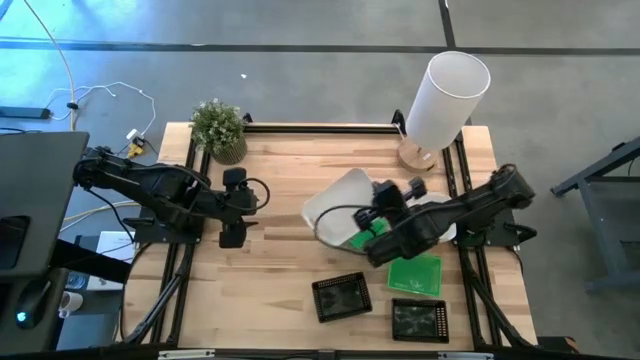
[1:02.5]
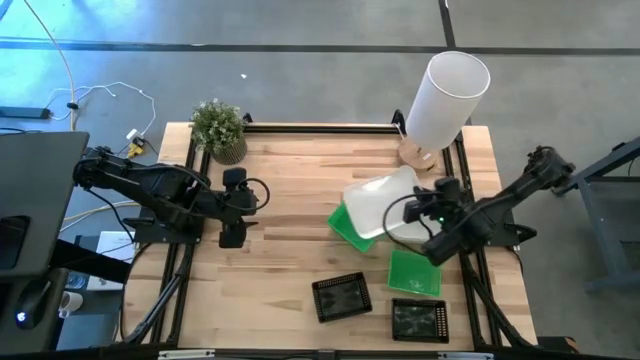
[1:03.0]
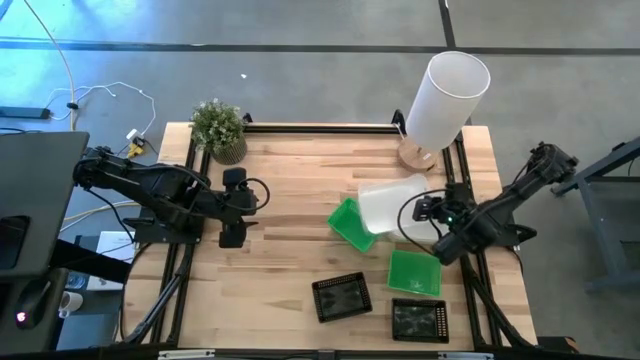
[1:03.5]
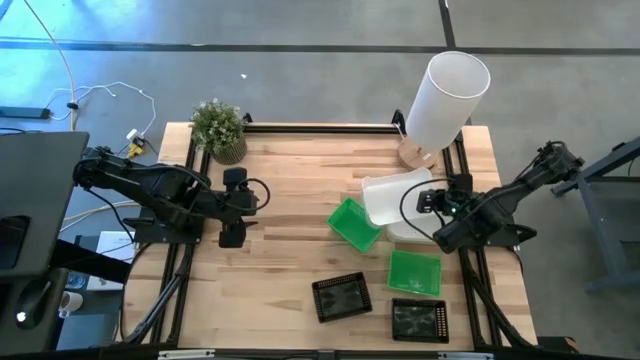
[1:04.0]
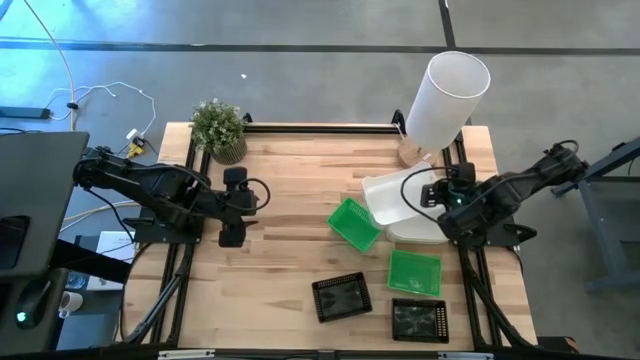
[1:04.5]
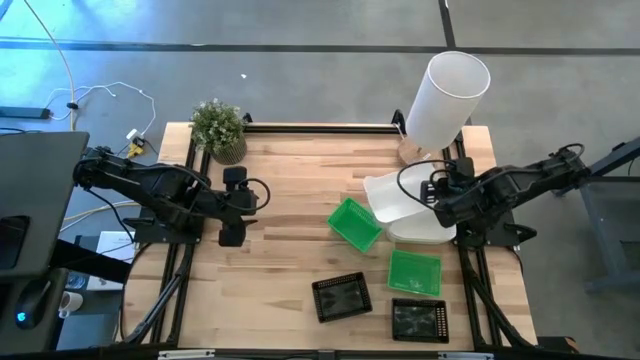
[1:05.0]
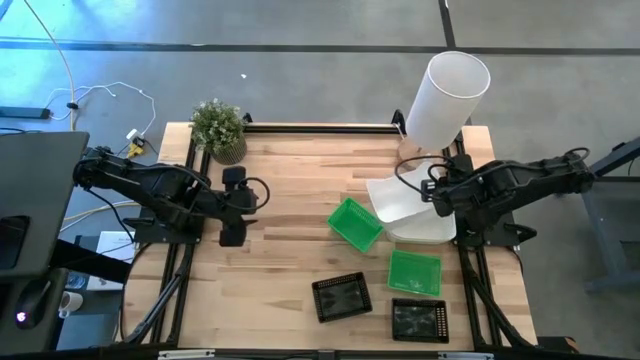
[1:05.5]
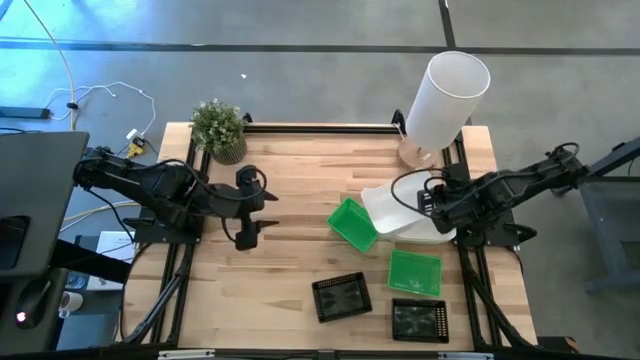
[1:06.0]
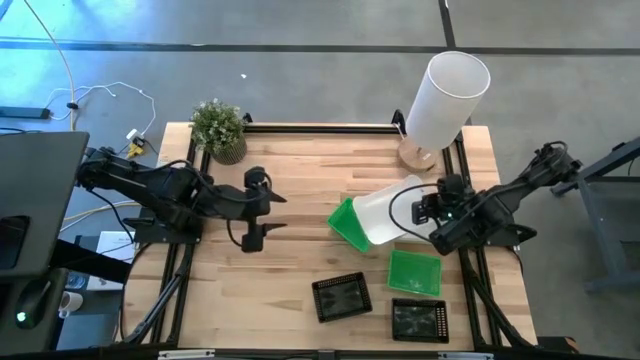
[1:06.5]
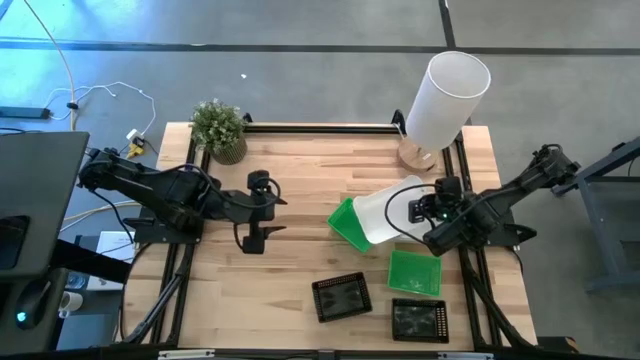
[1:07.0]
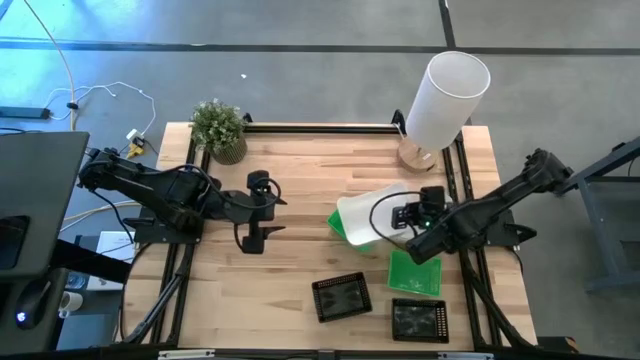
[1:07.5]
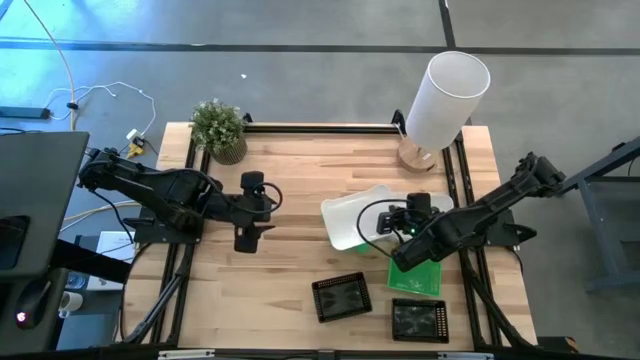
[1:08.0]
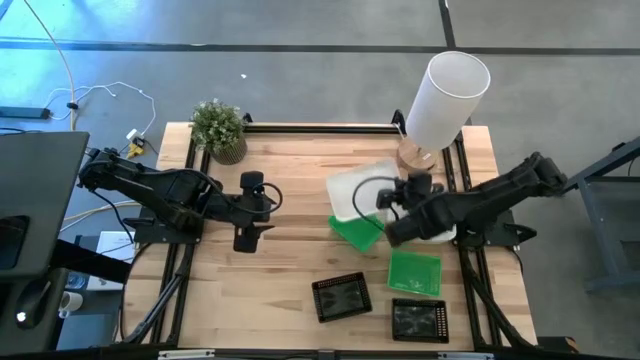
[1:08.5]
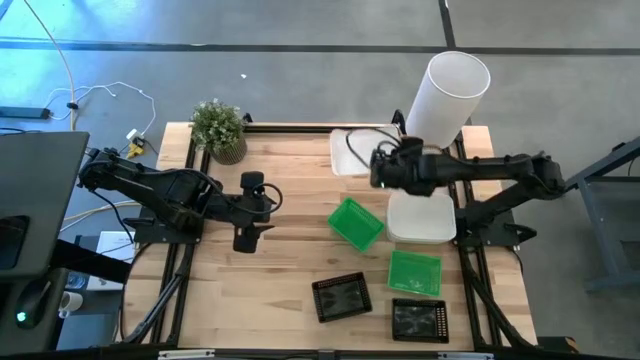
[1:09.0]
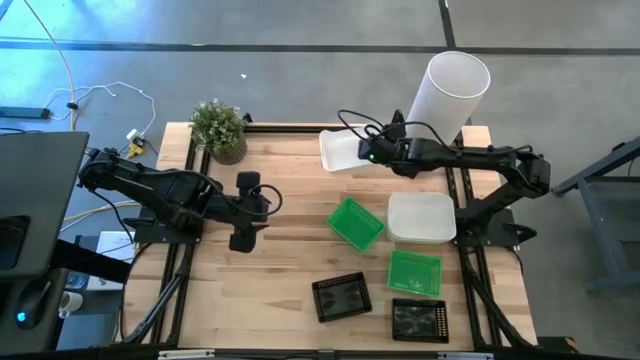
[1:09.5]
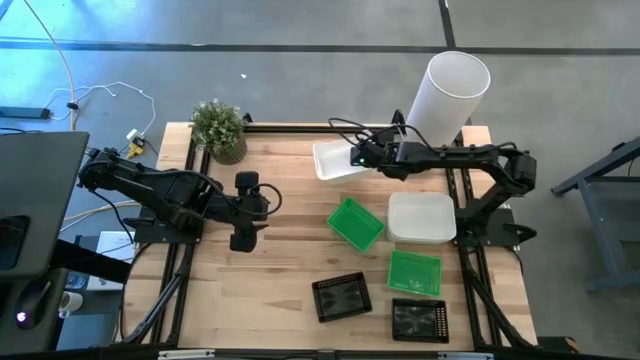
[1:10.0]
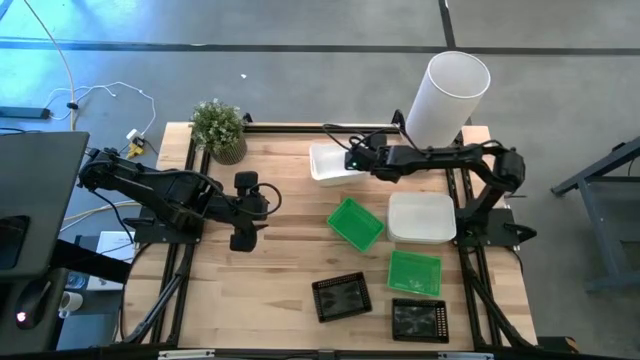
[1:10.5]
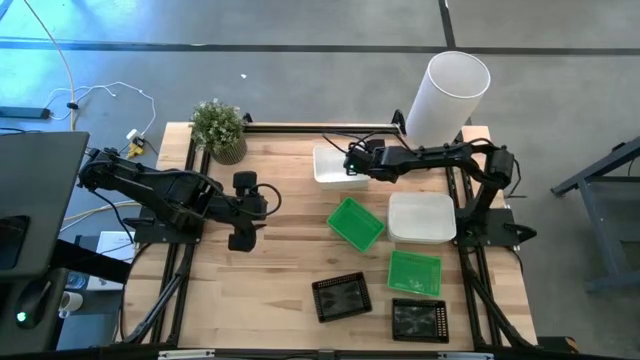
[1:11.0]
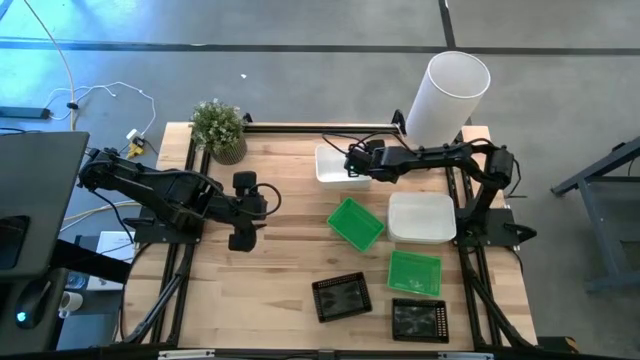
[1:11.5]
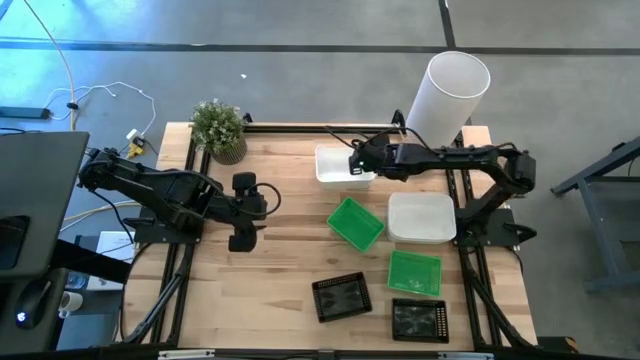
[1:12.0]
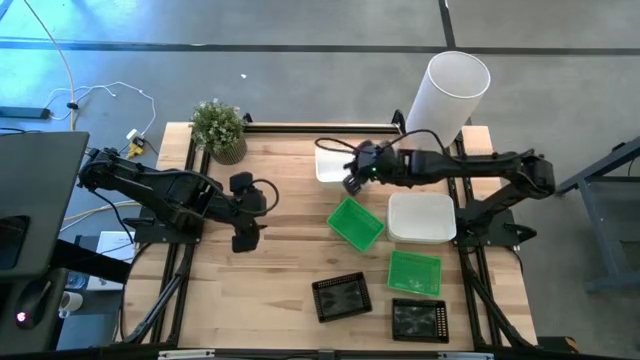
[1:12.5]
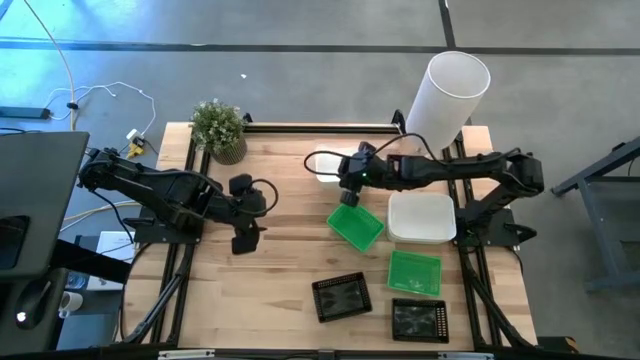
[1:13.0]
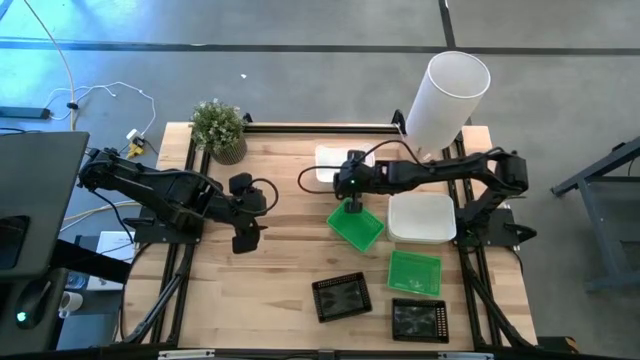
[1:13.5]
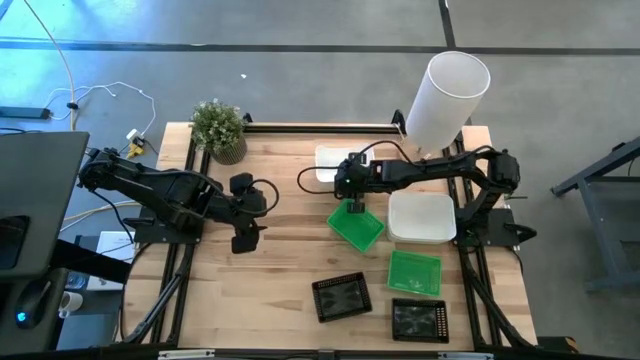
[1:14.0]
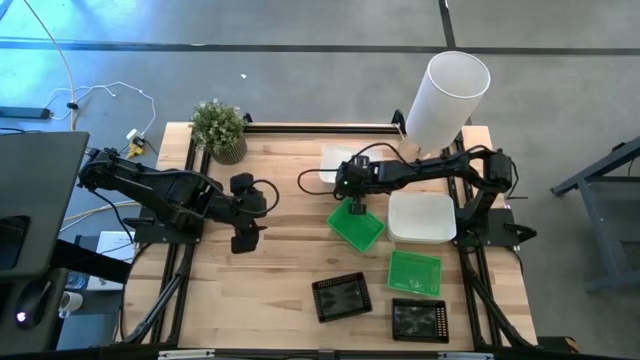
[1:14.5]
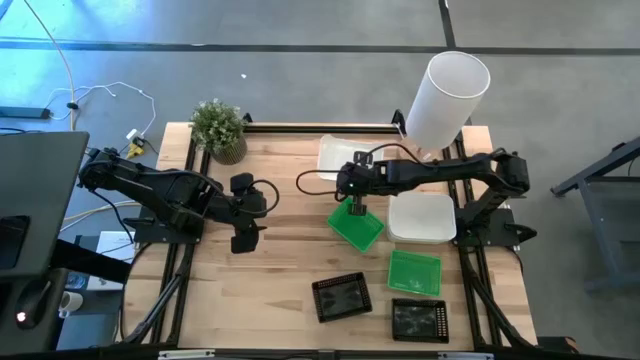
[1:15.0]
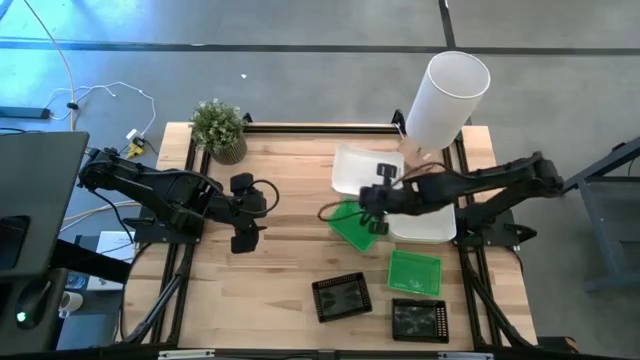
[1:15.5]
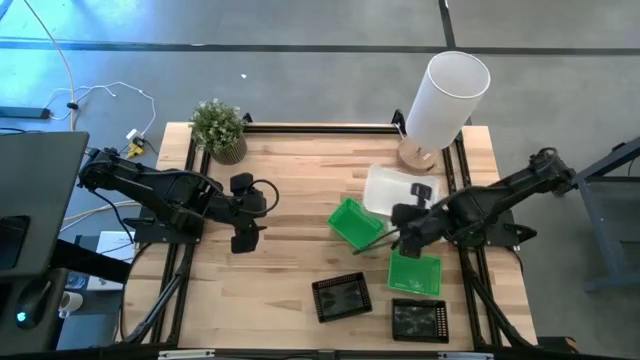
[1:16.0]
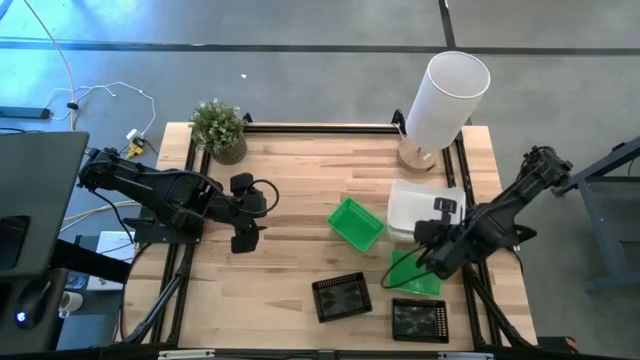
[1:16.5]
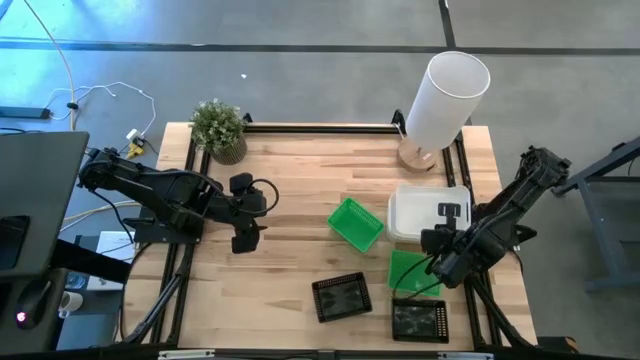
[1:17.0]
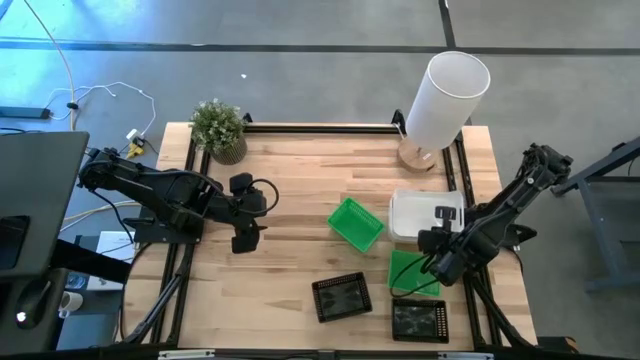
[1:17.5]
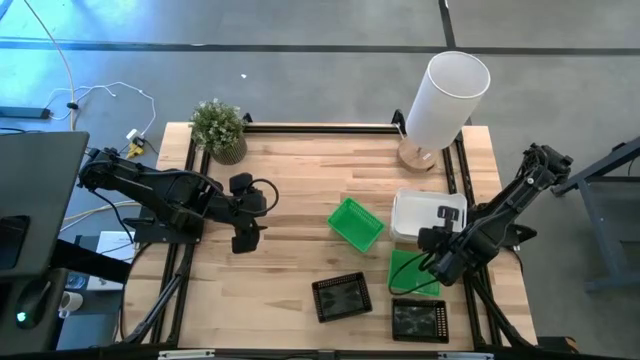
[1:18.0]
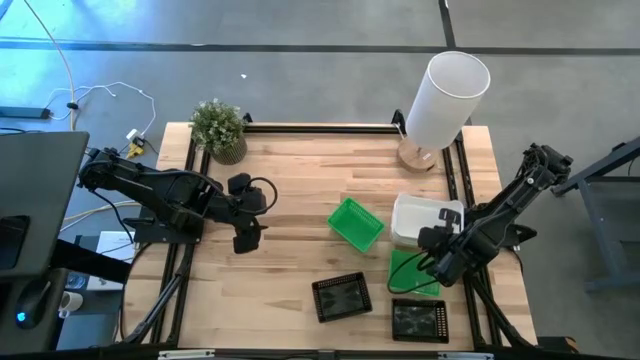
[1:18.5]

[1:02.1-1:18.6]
Stack the top white bin on the white bins

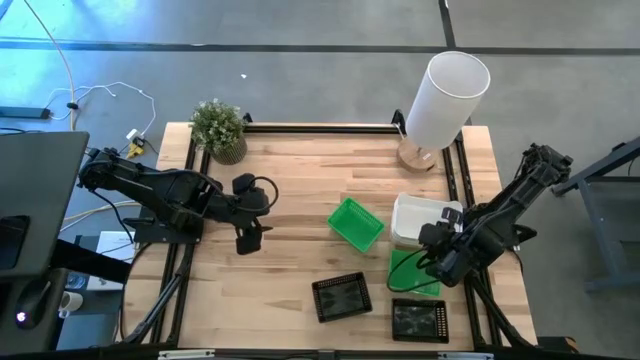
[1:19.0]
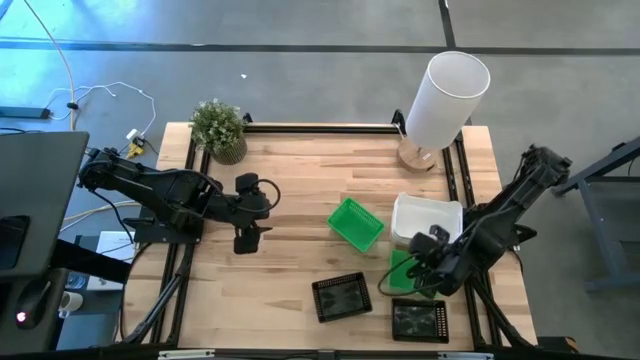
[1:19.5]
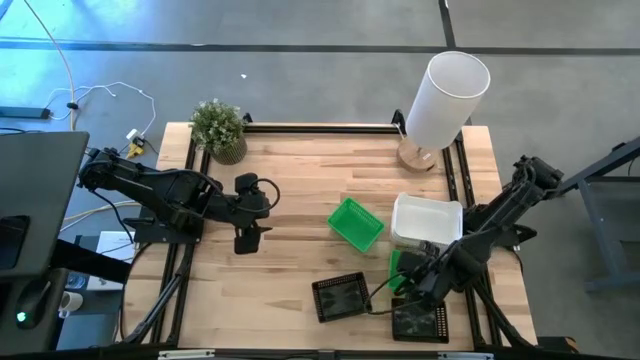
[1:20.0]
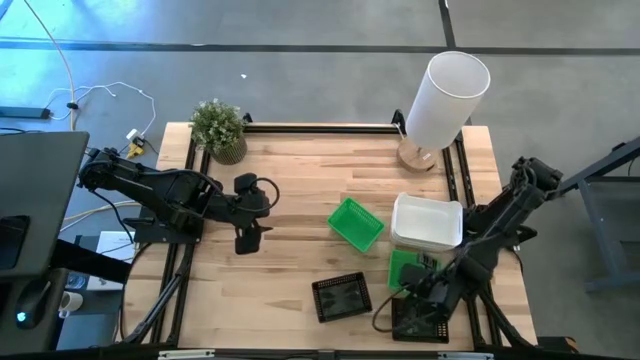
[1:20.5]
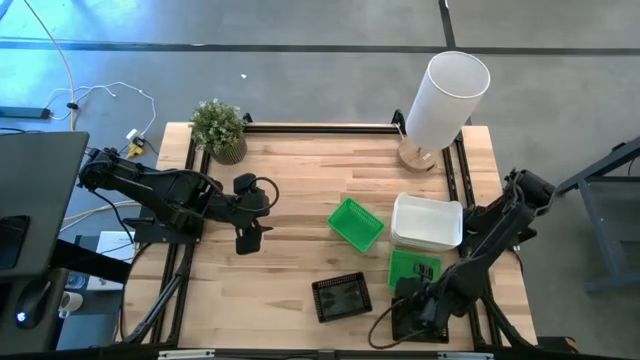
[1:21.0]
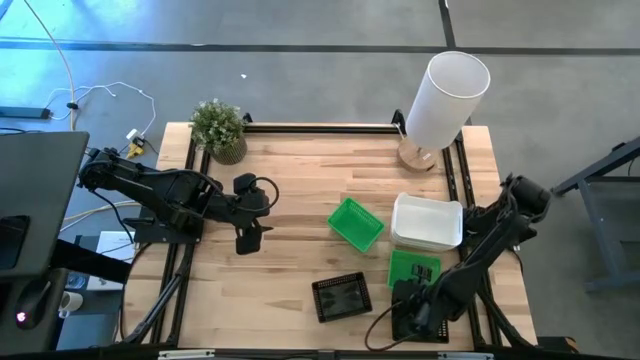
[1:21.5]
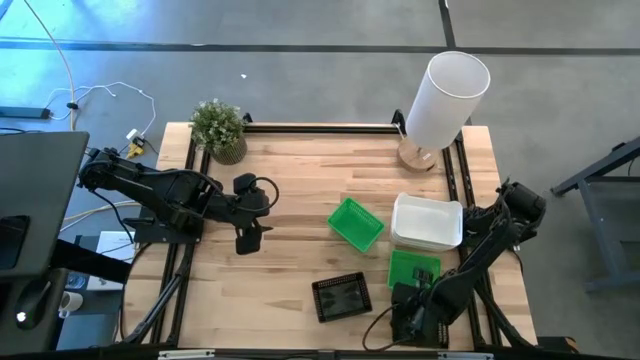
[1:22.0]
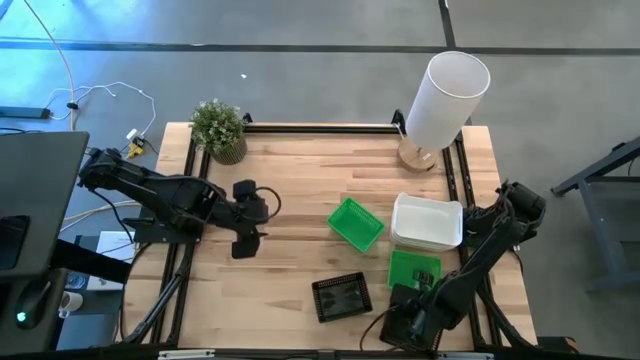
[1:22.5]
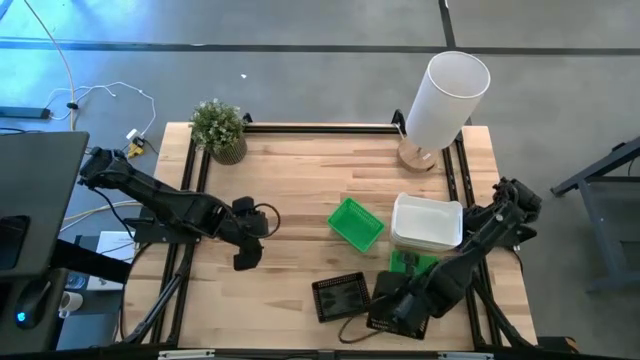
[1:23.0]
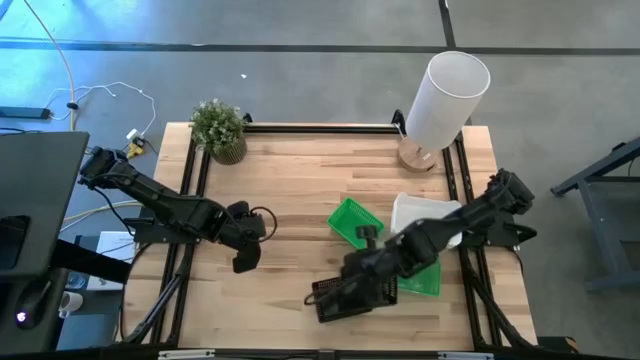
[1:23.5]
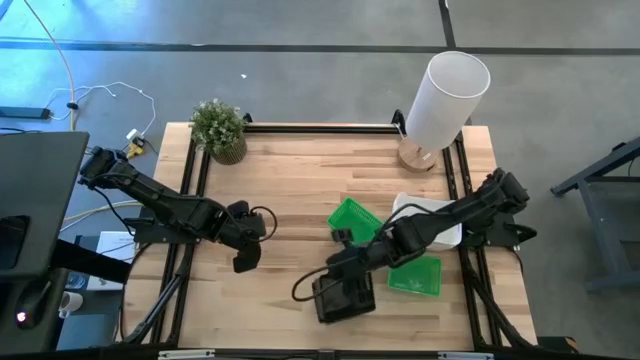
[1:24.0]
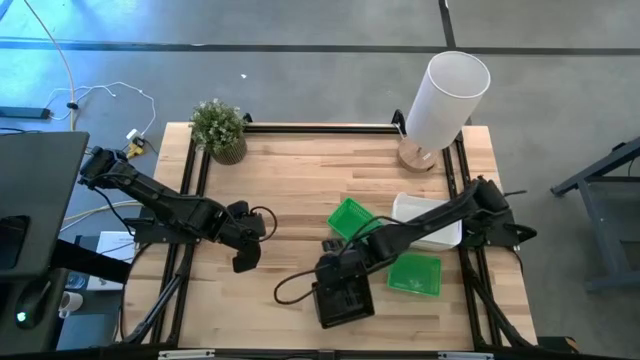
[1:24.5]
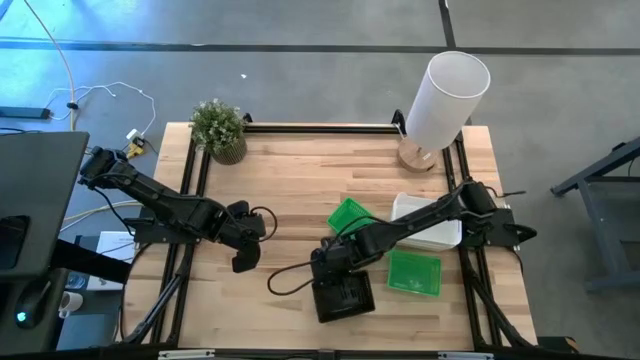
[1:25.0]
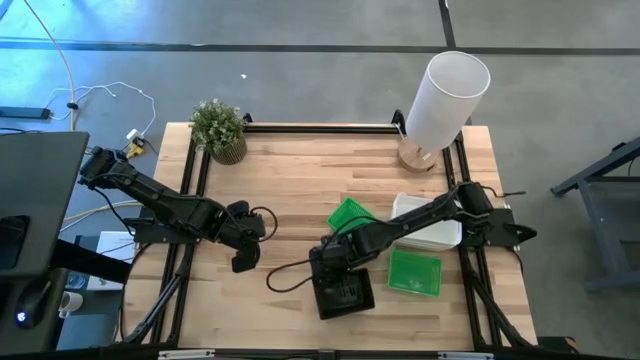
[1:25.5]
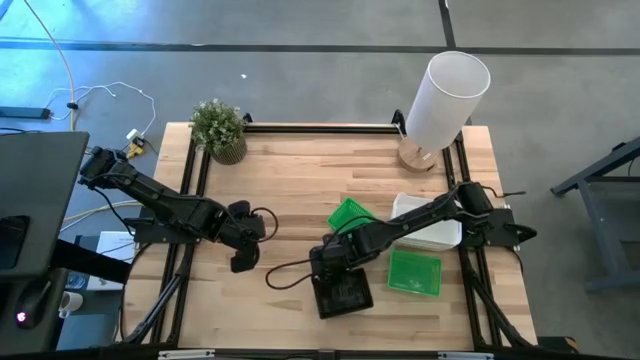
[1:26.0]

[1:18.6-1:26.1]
Stack the right black bin on the black bins
